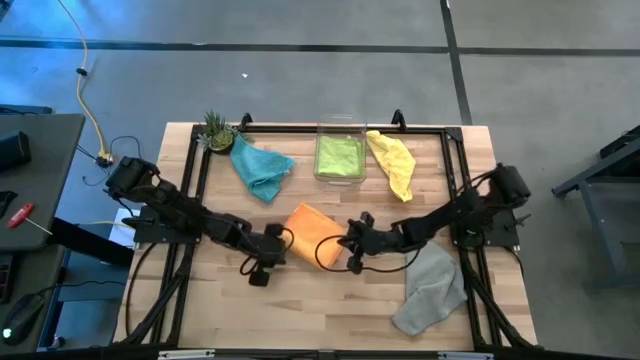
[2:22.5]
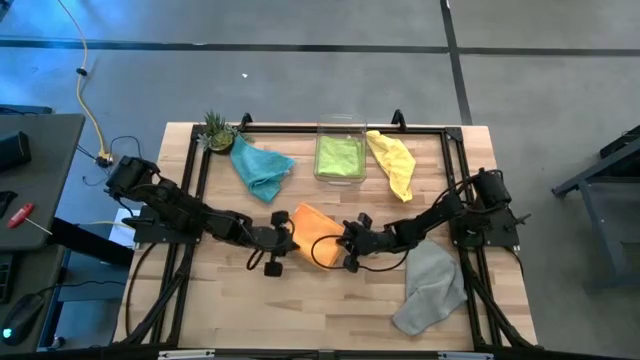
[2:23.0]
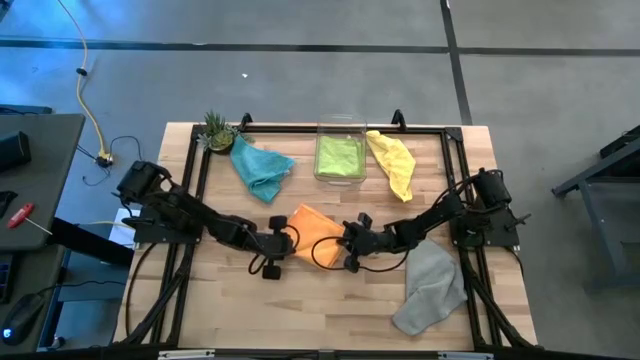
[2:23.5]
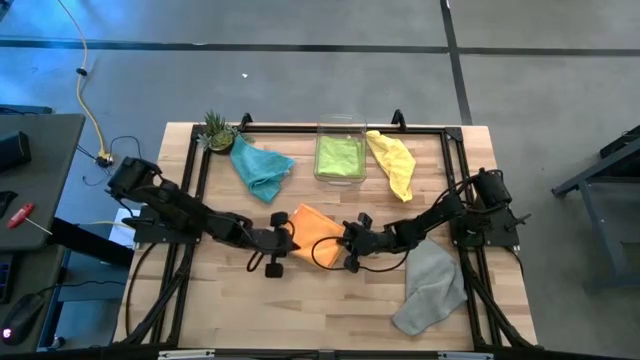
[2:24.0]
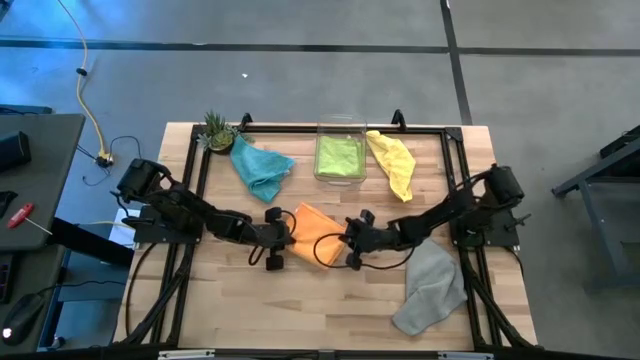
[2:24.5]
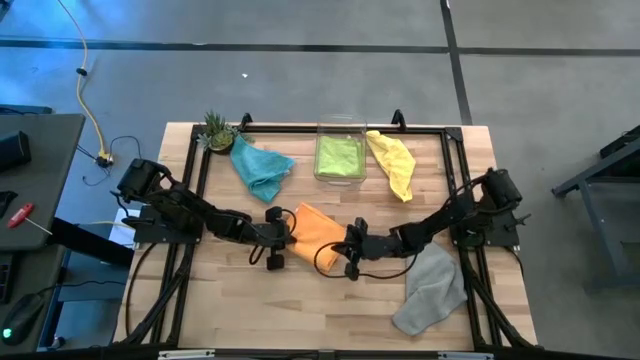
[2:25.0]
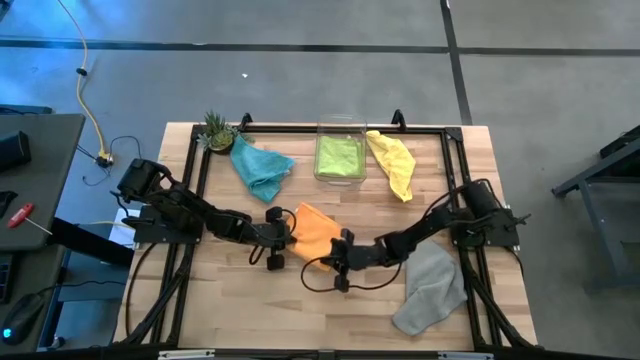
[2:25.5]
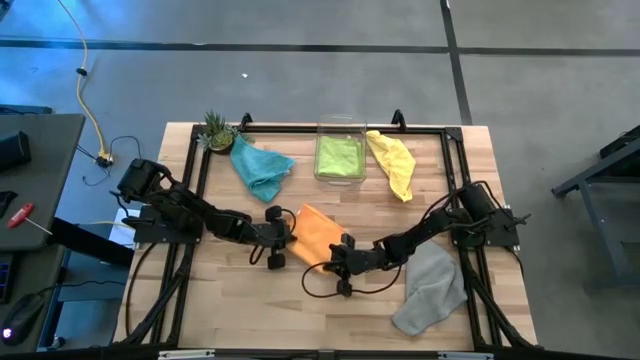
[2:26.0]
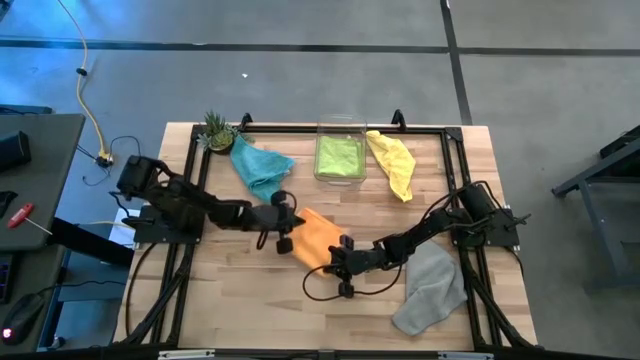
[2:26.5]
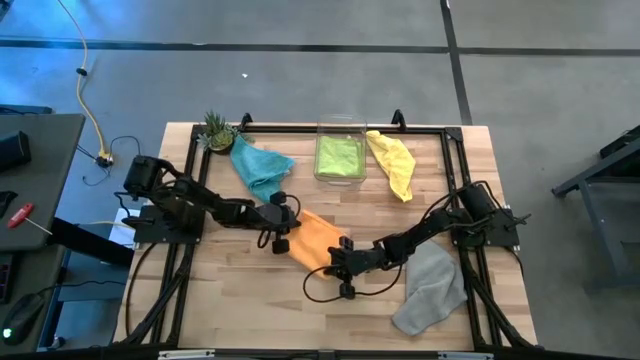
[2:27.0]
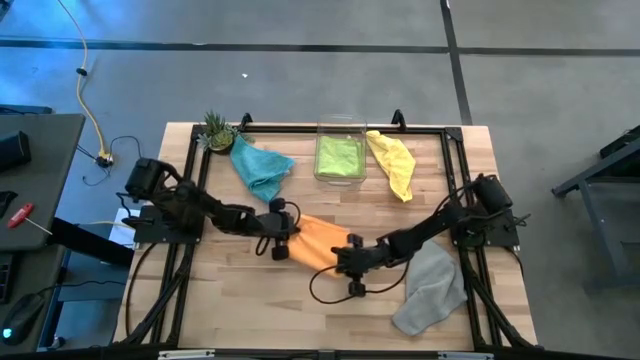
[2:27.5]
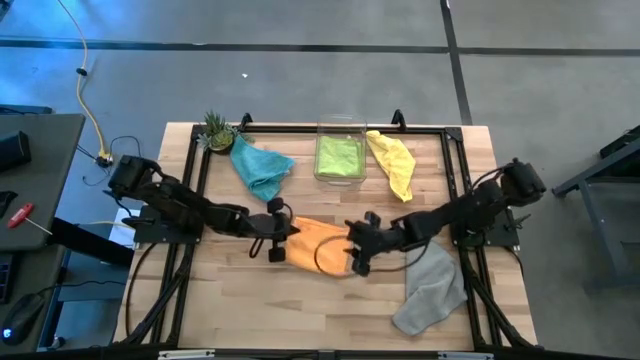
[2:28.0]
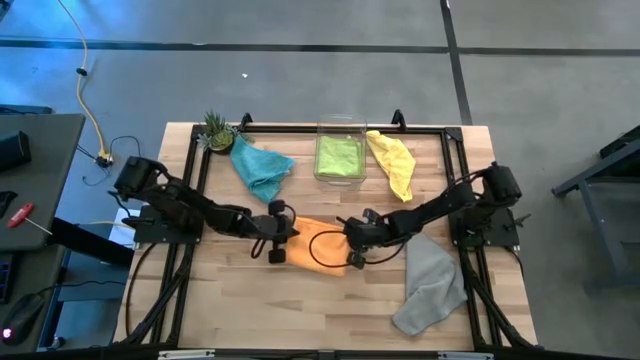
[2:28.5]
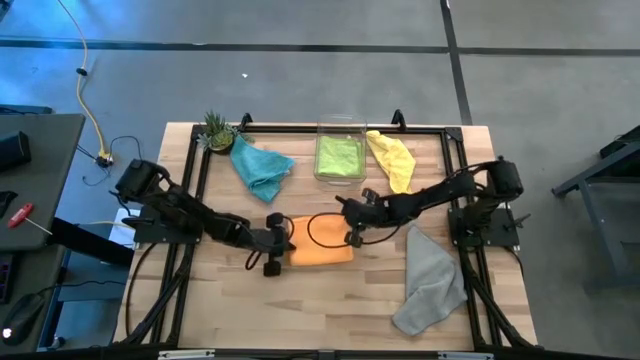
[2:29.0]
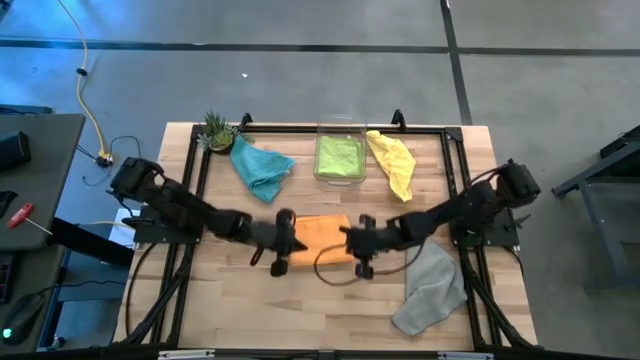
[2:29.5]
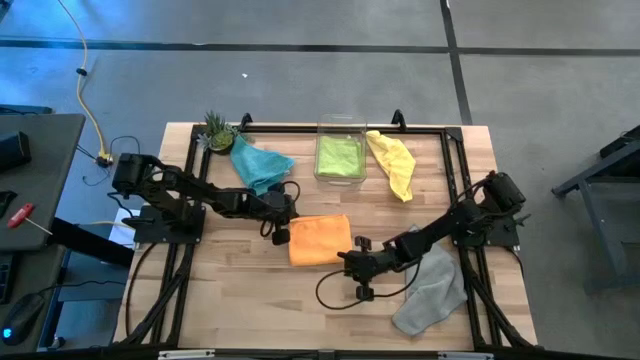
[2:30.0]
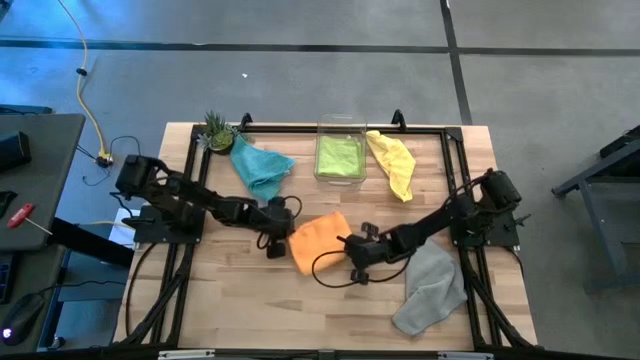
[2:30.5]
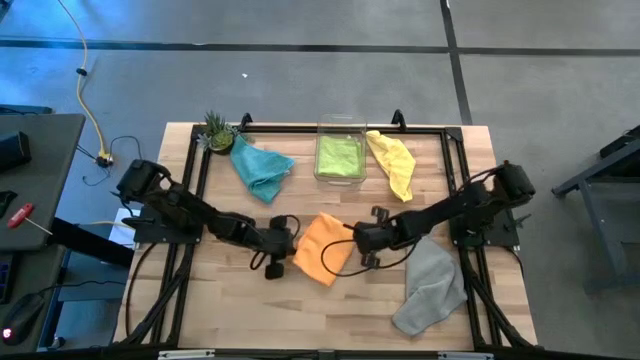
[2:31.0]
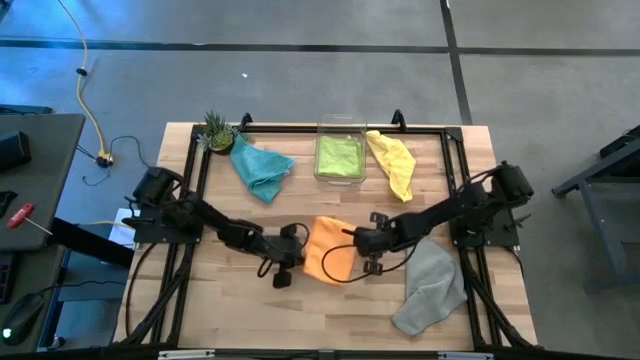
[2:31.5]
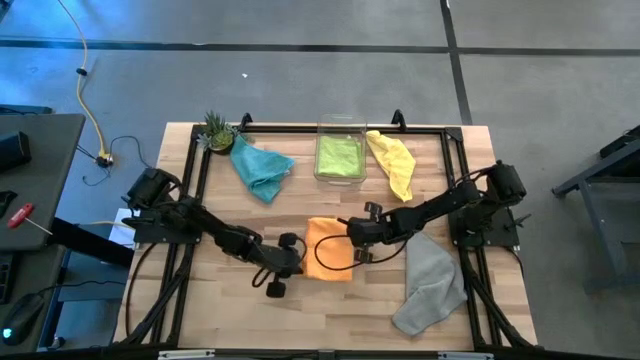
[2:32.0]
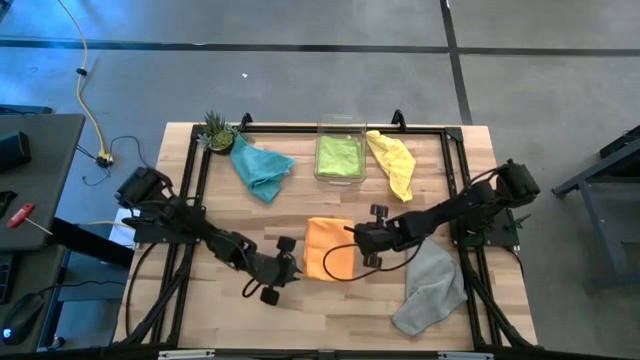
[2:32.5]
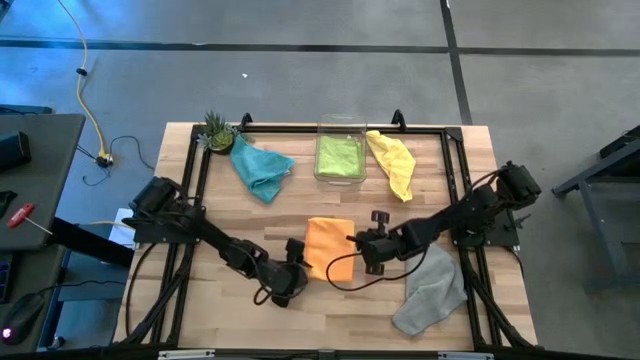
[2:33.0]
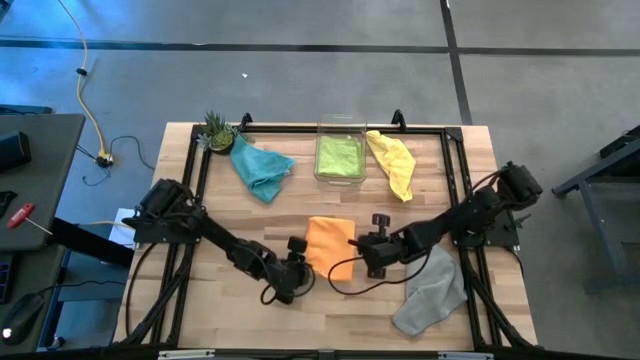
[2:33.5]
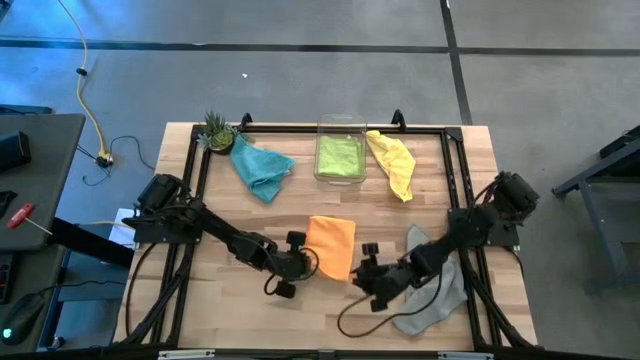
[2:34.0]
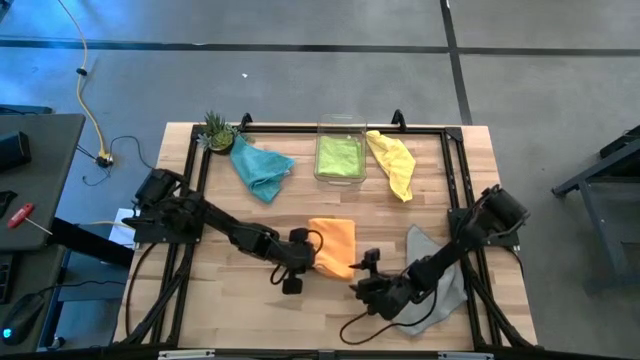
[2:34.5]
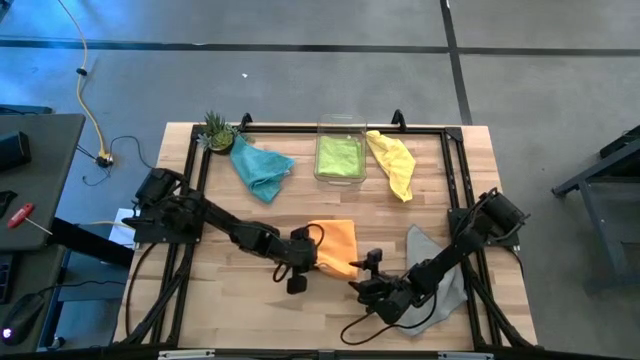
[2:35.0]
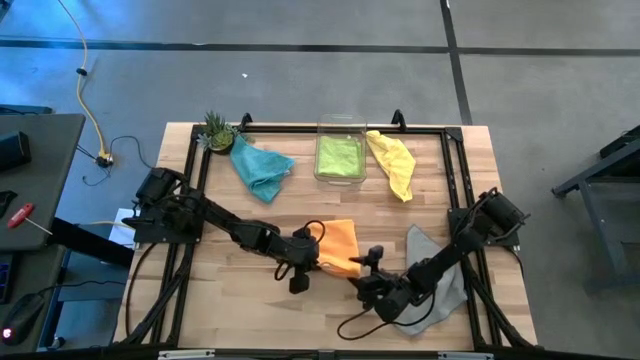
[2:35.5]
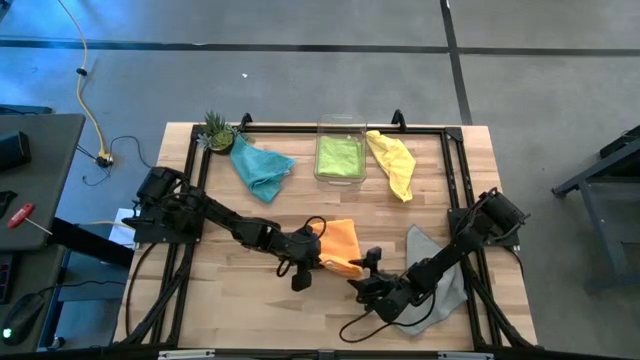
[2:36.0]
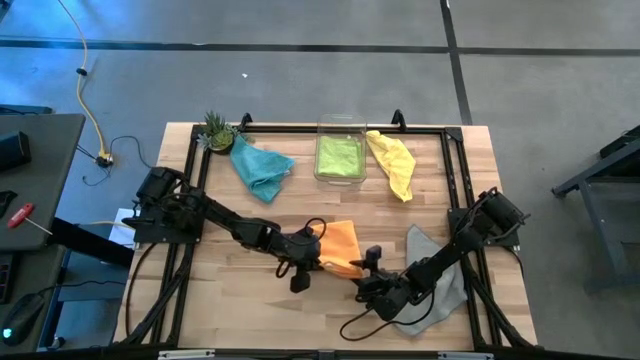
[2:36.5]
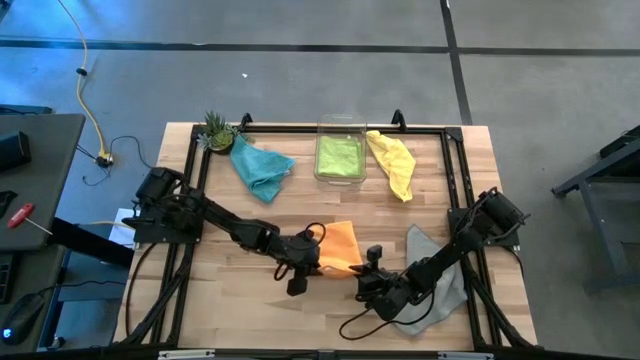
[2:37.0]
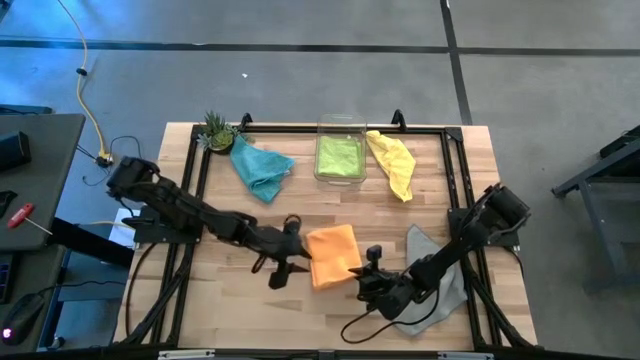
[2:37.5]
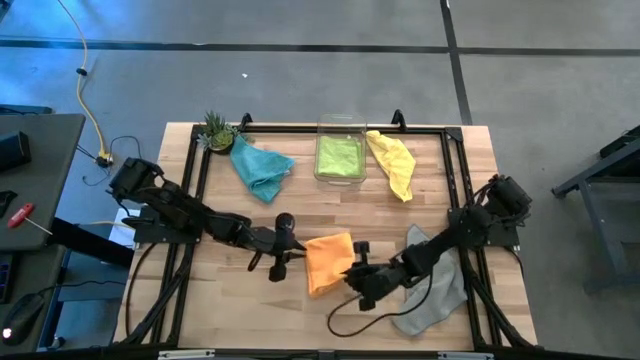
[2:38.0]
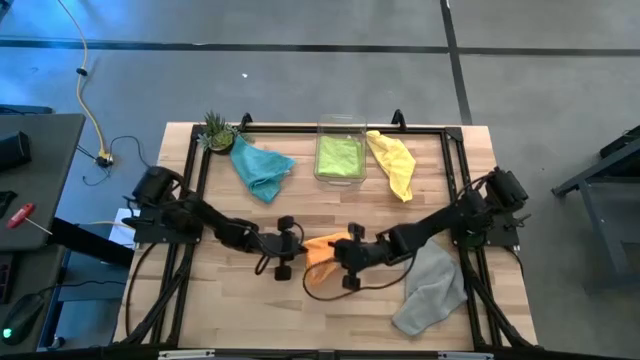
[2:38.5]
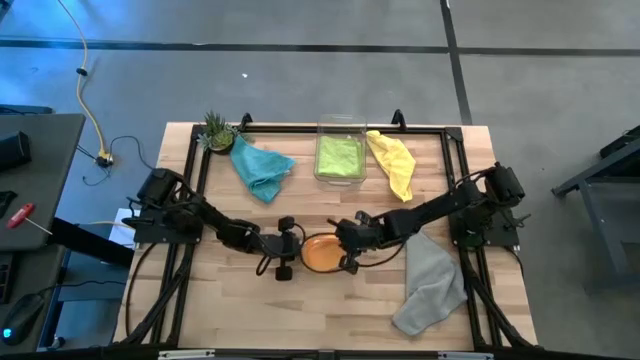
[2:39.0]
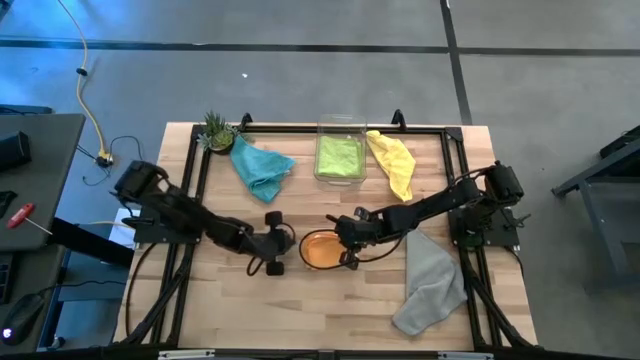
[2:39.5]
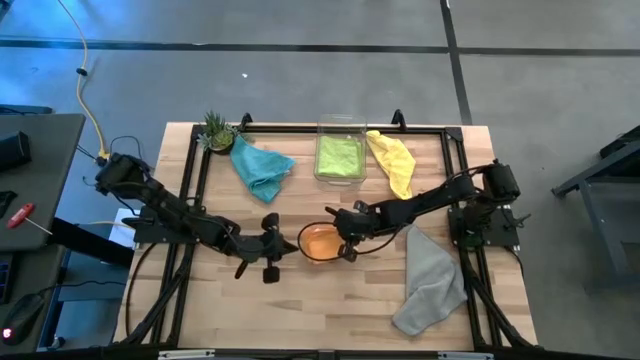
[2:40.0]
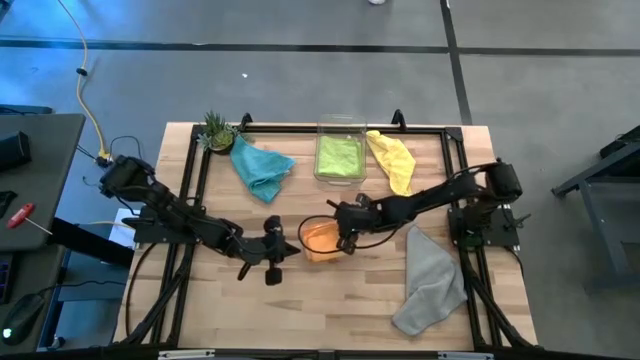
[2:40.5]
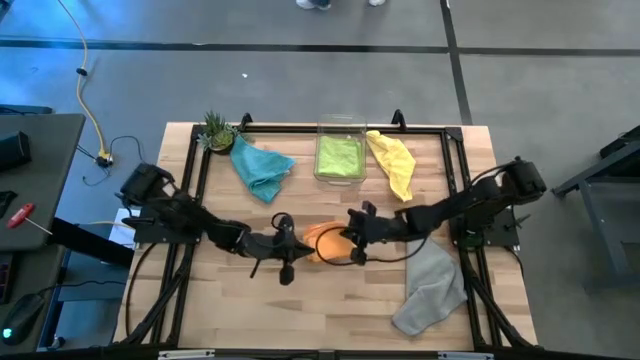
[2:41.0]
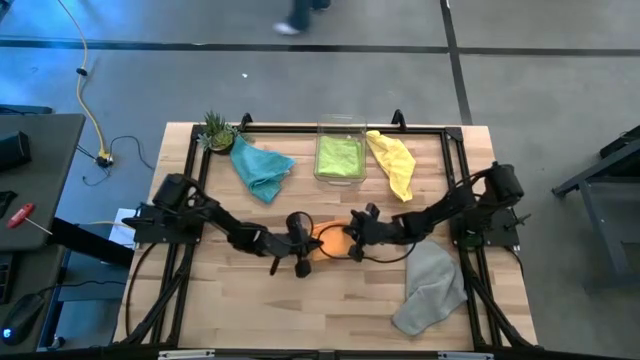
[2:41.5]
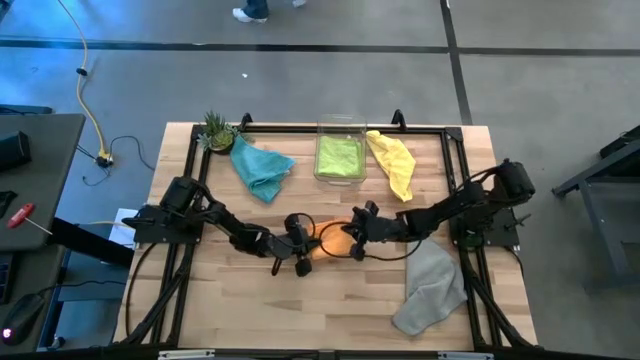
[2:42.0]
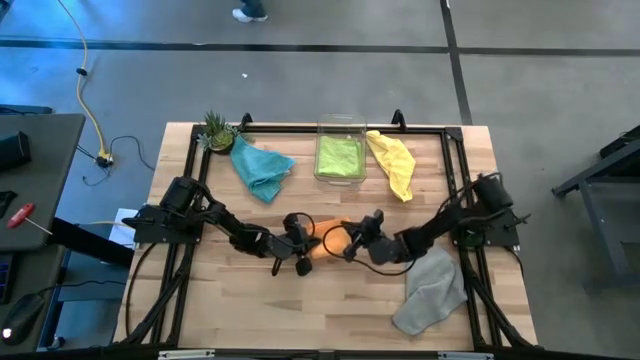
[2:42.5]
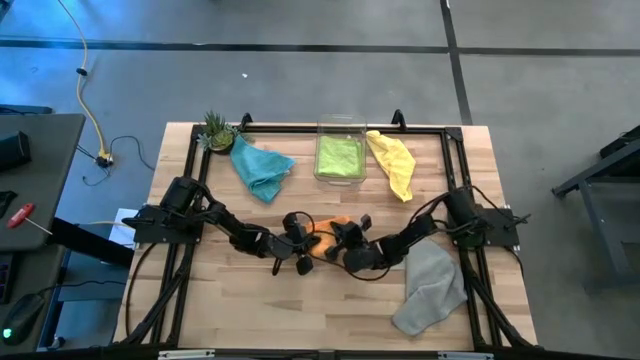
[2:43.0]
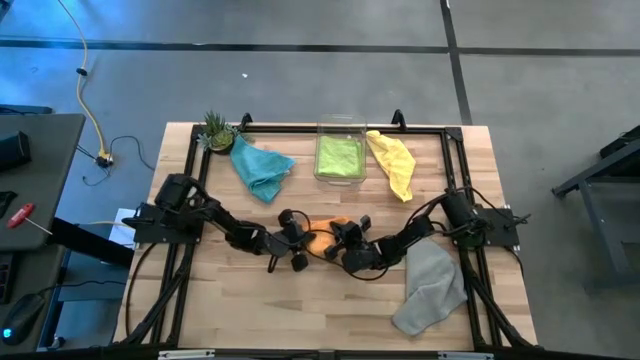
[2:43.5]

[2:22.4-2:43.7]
Task: Fold microfiber towels
Fold the orange microfiber cloth
